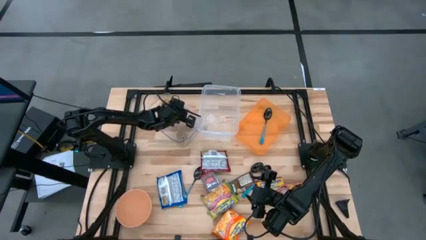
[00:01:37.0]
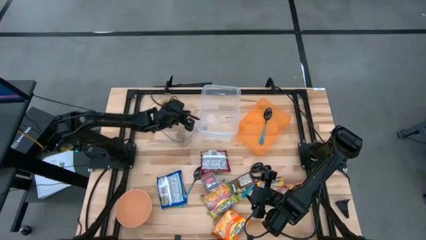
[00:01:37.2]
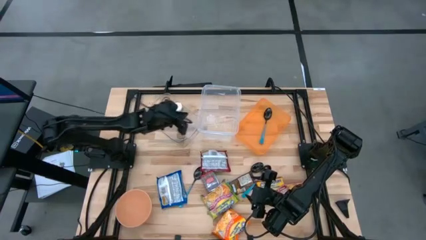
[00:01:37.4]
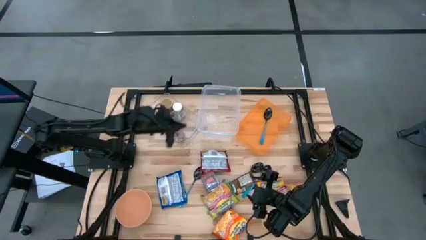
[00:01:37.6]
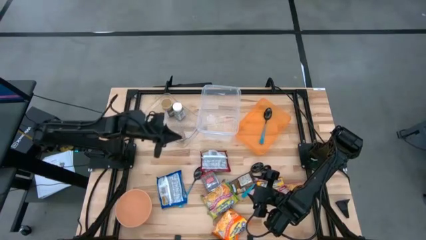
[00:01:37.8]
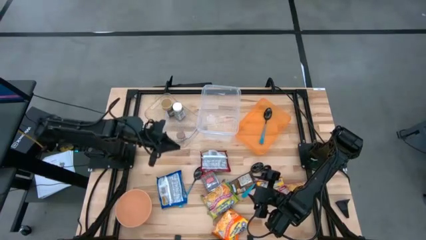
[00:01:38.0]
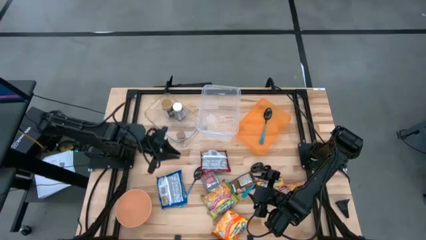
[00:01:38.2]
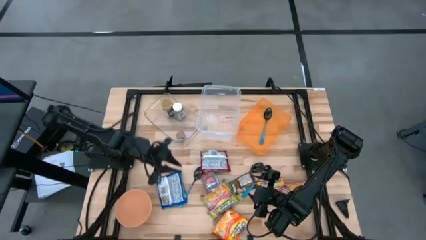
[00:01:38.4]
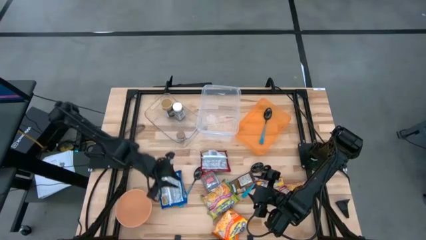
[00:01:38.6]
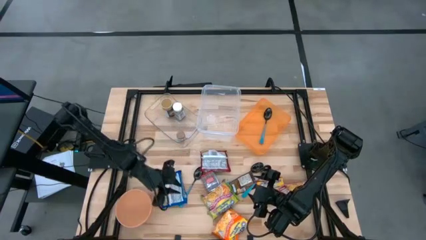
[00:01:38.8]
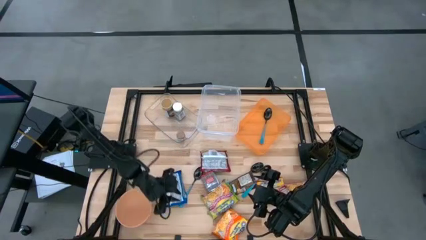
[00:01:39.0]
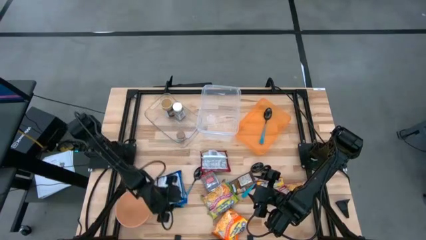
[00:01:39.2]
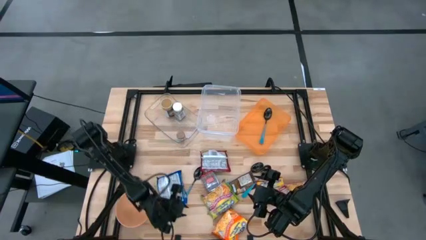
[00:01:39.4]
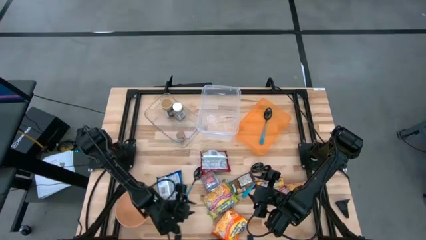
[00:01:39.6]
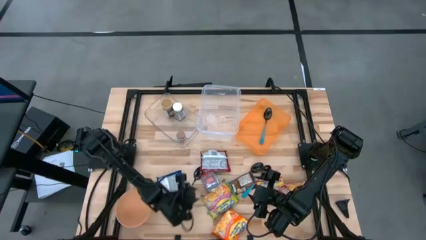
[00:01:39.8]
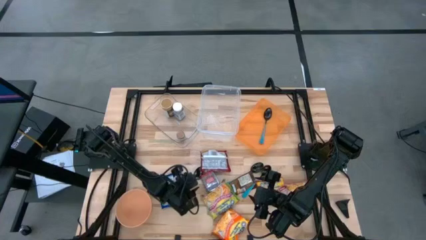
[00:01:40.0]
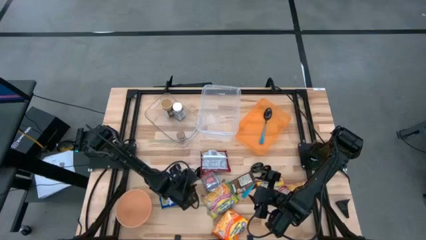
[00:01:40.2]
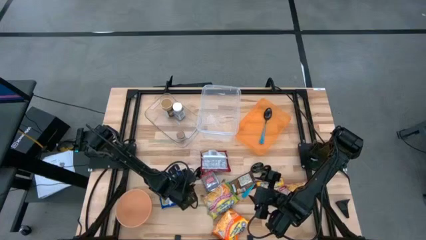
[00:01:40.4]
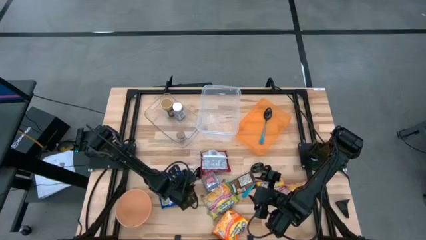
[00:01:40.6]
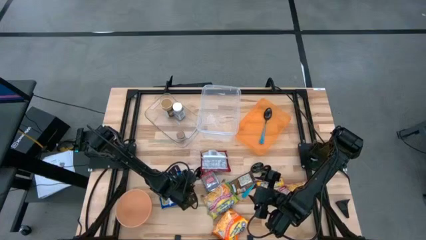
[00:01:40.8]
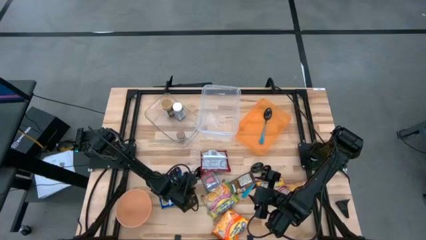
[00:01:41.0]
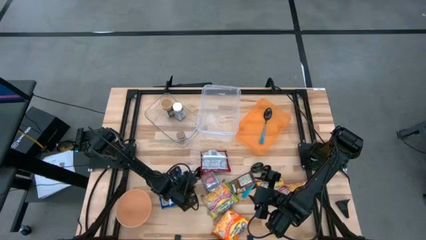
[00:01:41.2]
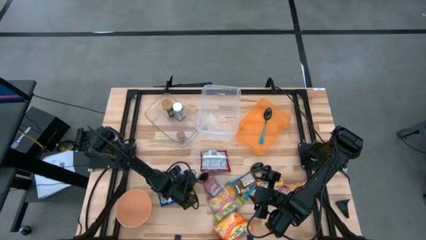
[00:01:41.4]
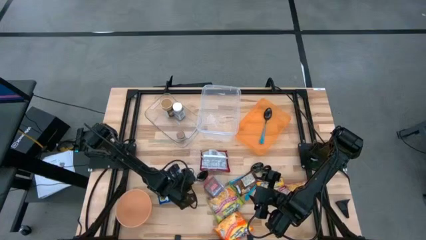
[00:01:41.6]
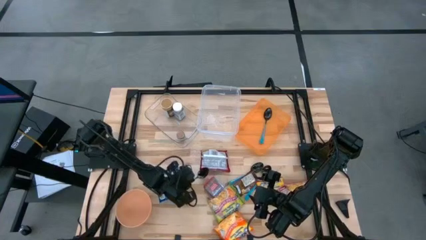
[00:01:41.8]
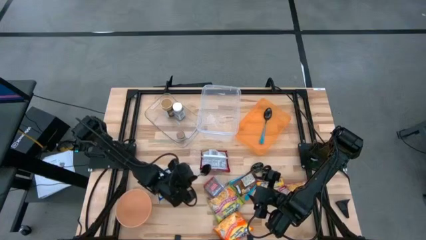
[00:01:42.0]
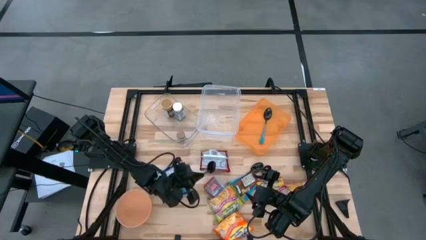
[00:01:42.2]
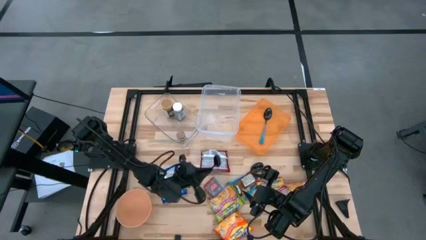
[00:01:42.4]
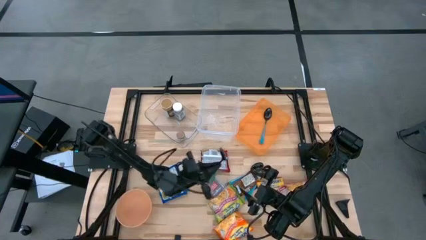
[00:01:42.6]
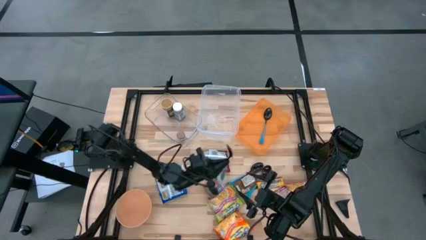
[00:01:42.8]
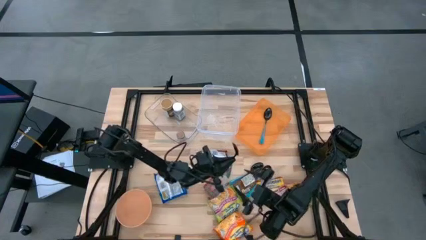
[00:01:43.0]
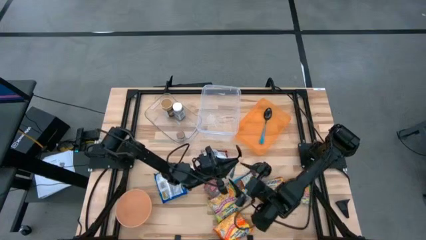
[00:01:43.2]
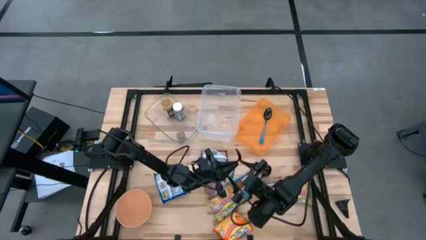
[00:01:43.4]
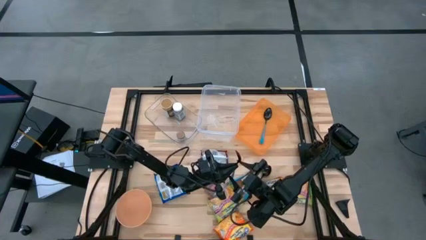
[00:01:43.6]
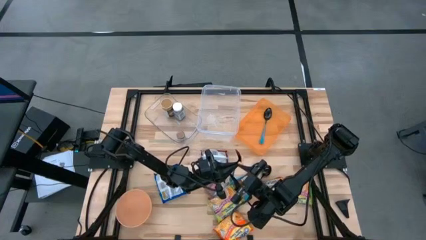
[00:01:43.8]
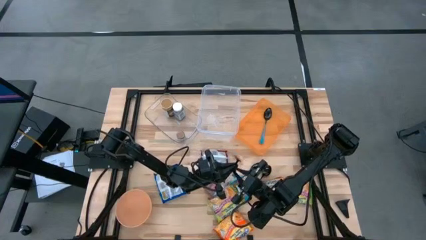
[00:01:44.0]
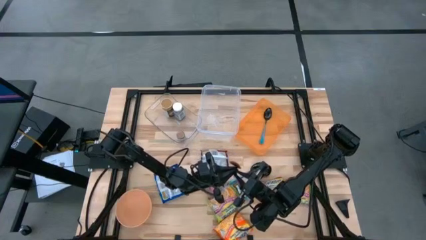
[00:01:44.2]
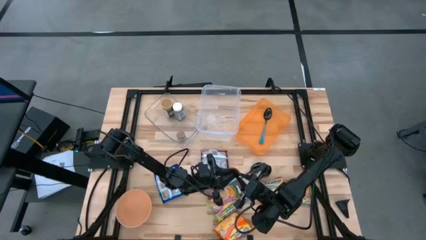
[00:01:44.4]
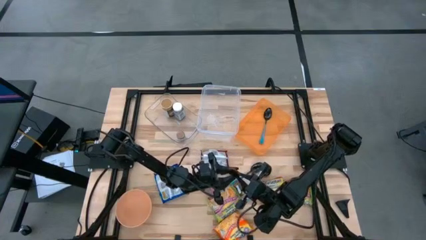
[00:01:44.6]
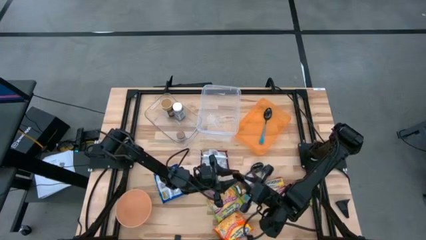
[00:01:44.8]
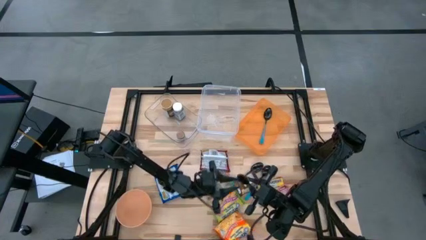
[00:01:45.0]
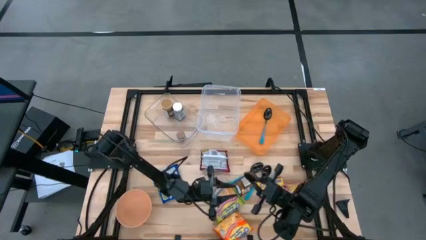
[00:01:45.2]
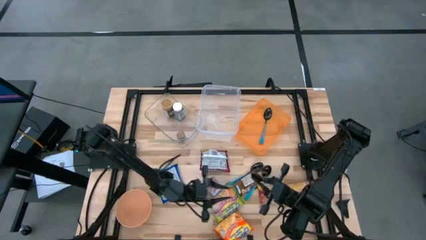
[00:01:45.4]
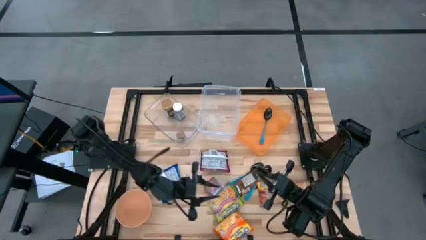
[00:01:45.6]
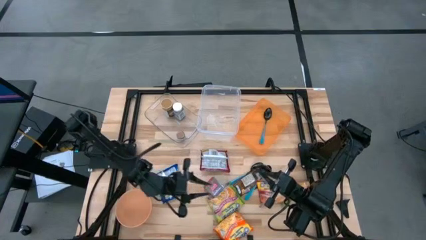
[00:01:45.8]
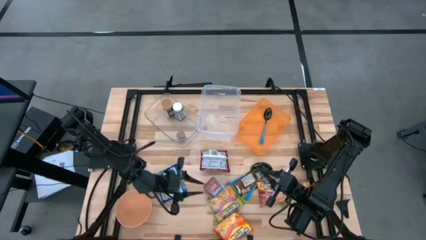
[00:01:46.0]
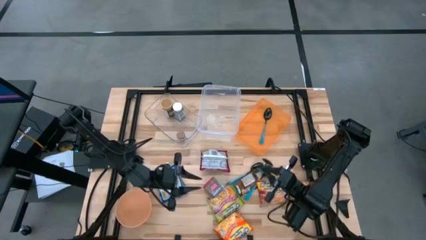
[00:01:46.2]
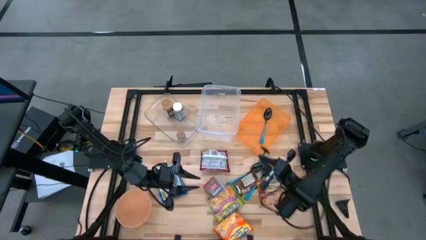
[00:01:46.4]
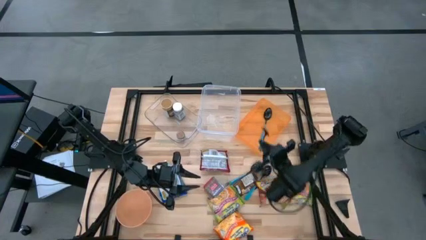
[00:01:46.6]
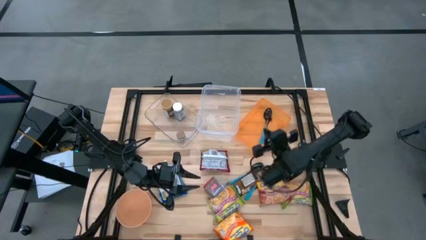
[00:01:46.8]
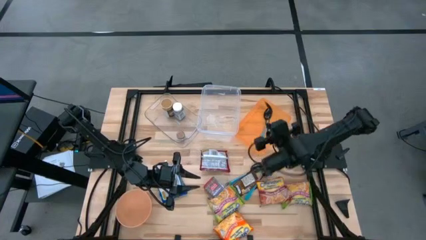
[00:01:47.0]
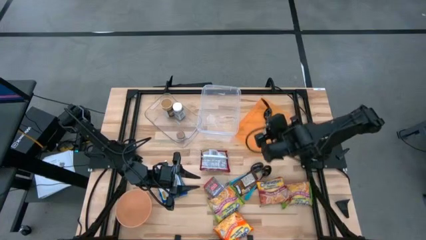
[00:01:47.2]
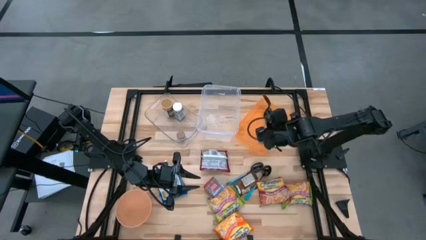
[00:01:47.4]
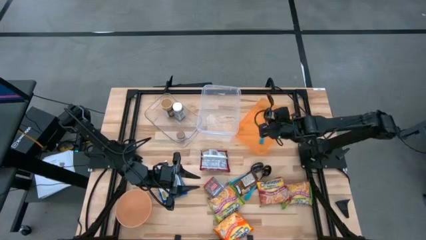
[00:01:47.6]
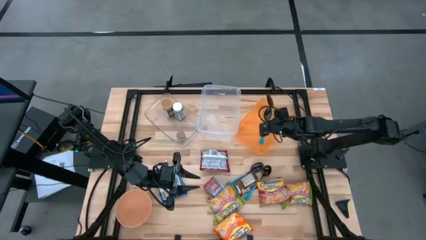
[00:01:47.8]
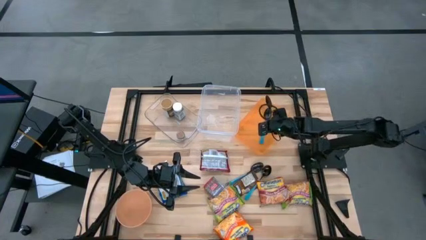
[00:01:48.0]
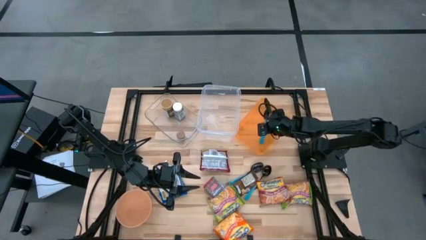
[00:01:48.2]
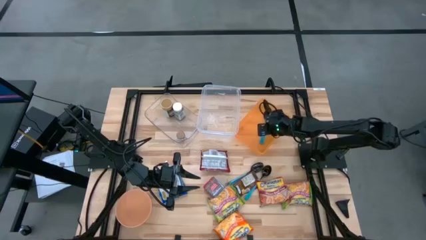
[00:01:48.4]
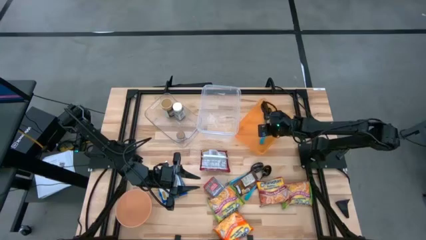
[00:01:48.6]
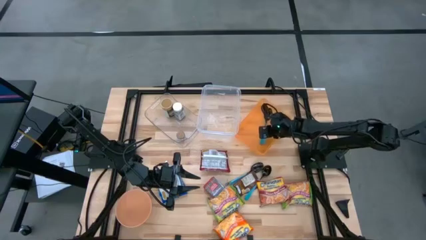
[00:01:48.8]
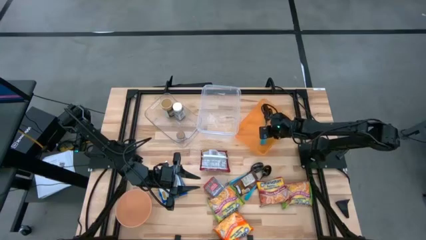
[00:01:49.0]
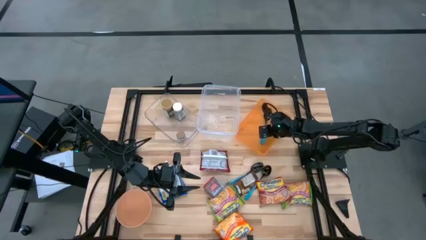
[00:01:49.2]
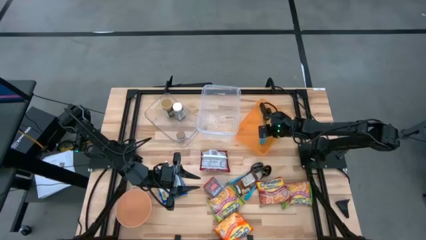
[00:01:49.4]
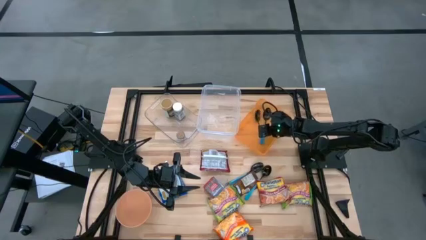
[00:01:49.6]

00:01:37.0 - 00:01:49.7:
Task: Pick & Place Food Item
Put the blue spoon into the orange bin

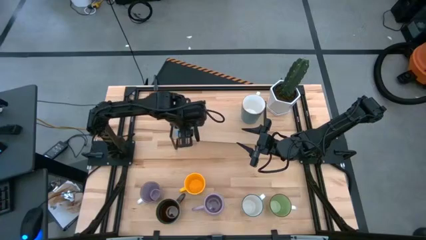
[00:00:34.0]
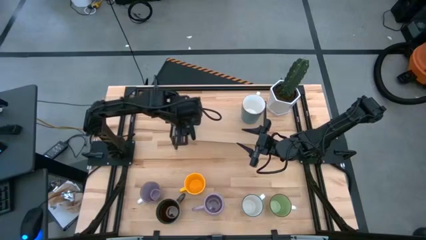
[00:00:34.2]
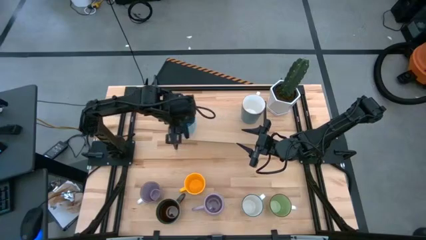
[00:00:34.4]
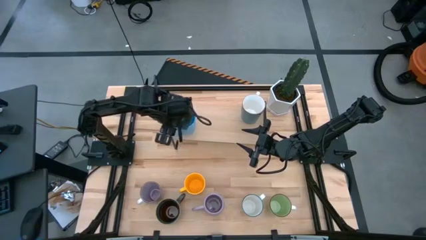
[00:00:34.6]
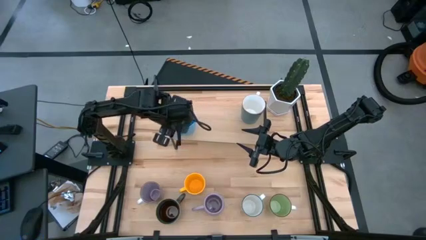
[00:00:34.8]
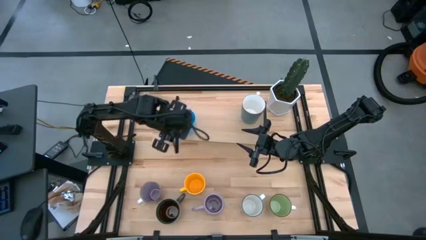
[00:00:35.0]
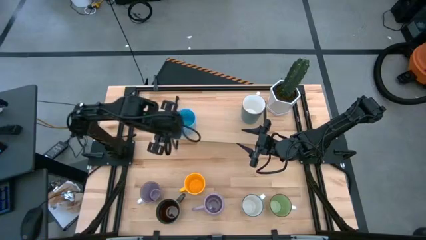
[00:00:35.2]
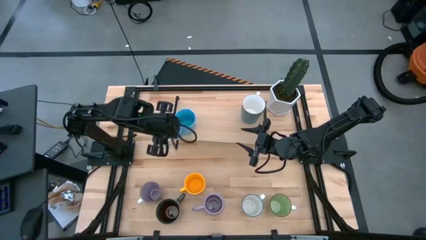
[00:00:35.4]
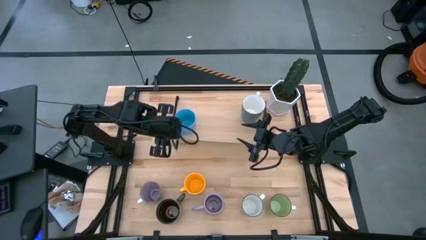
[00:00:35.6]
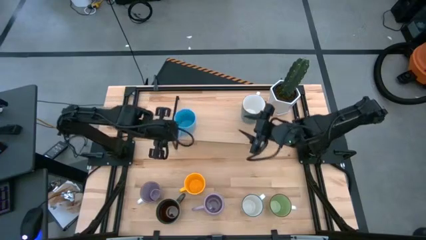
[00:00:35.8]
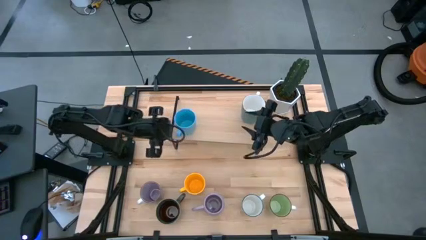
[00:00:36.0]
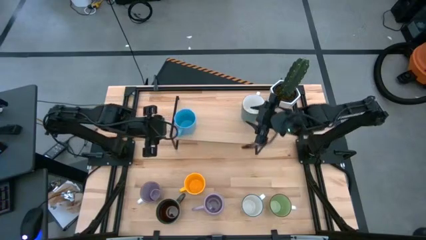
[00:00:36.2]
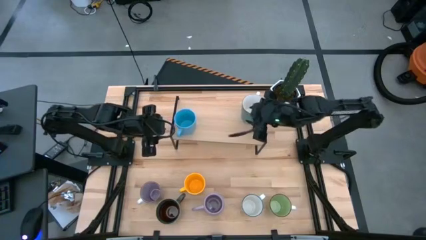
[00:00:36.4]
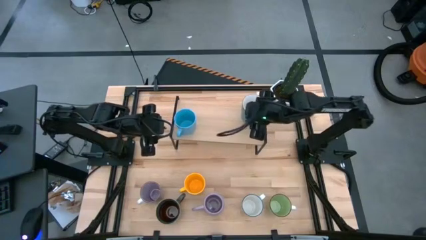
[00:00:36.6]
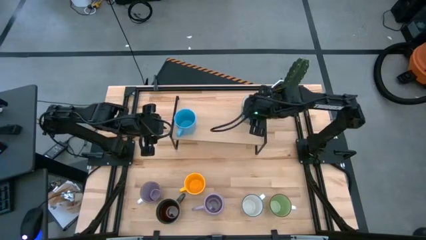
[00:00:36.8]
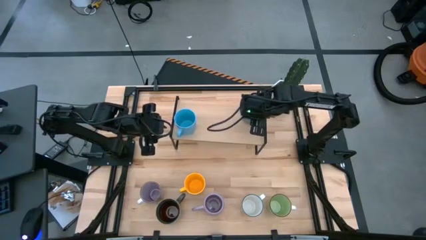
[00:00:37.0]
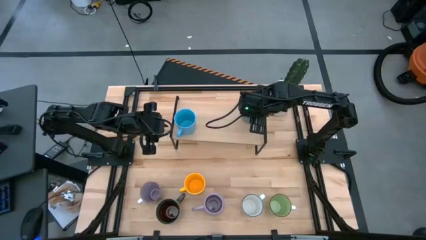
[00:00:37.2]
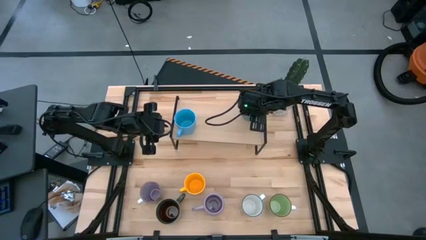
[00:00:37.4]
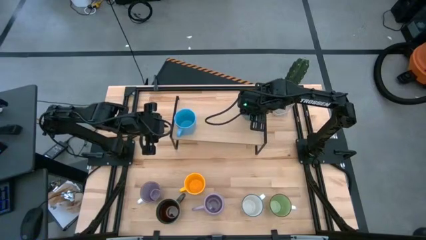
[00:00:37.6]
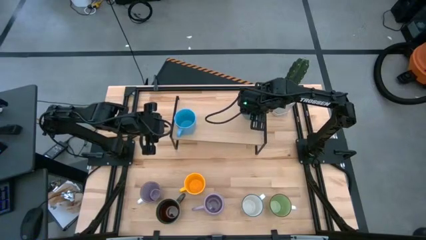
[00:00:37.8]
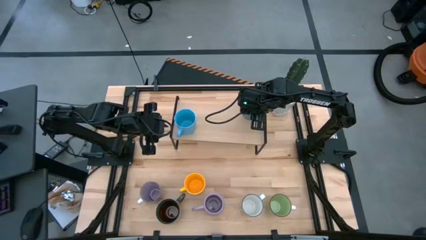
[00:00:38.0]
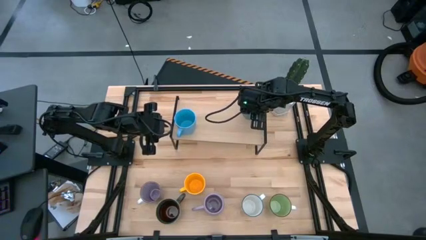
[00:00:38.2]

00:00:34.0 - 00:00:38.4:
Task: Place coffee mugs
Adjust the blue mug on the shelf
